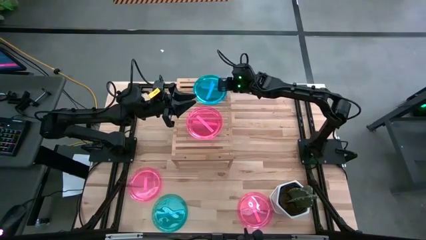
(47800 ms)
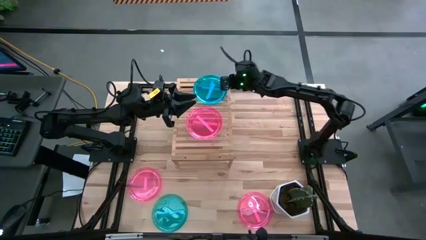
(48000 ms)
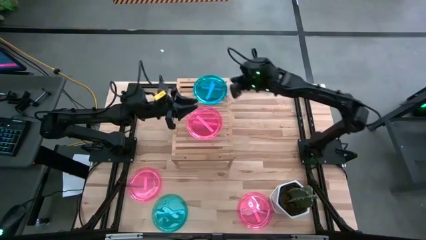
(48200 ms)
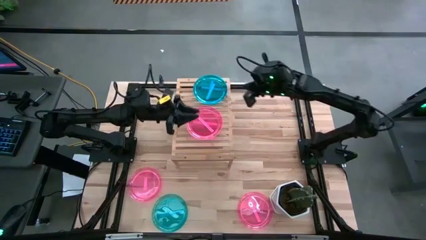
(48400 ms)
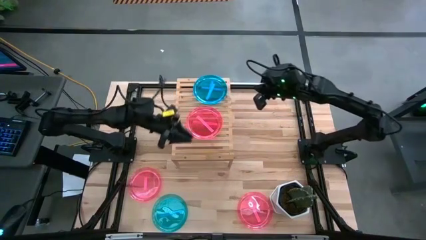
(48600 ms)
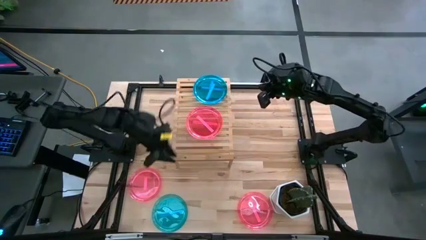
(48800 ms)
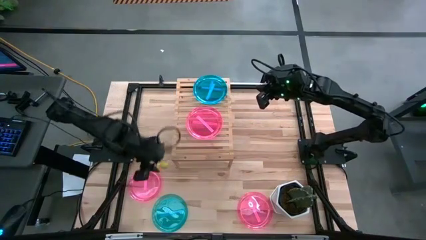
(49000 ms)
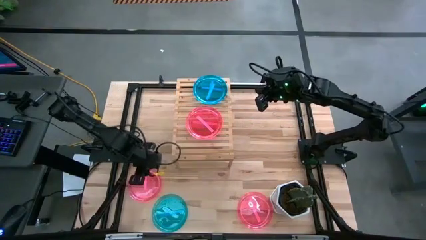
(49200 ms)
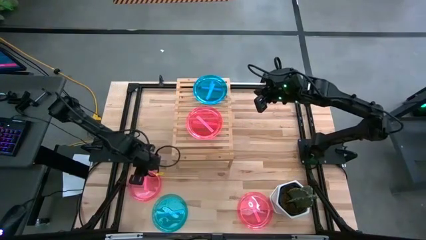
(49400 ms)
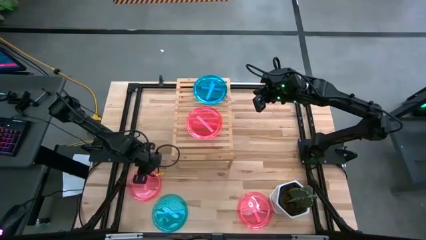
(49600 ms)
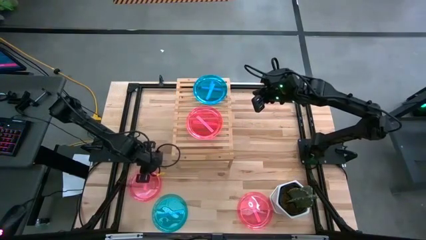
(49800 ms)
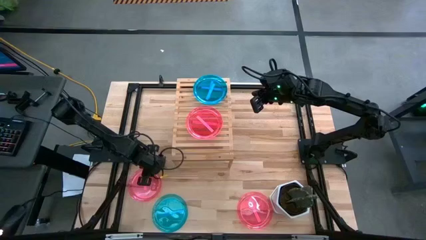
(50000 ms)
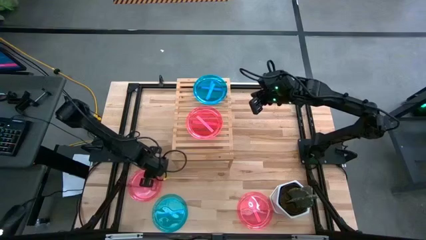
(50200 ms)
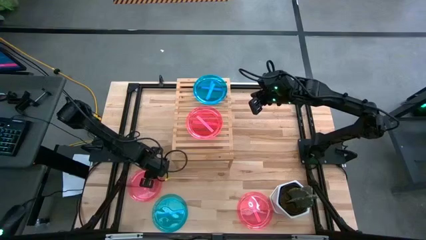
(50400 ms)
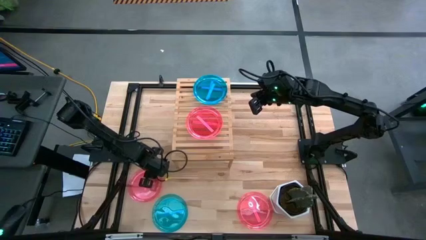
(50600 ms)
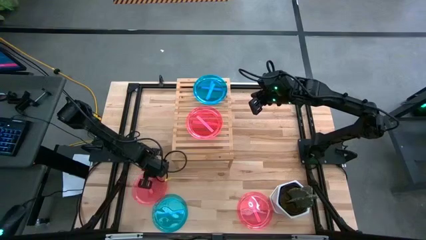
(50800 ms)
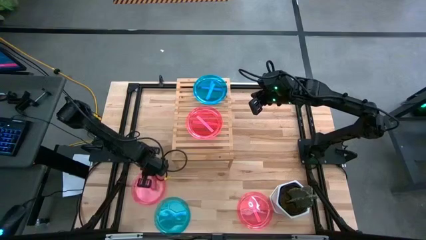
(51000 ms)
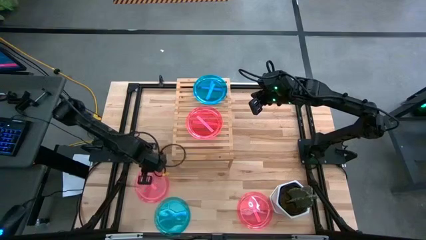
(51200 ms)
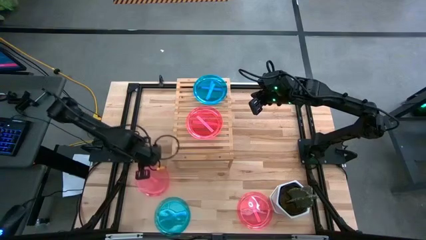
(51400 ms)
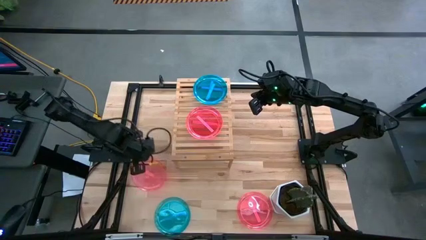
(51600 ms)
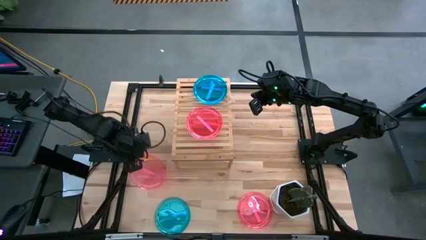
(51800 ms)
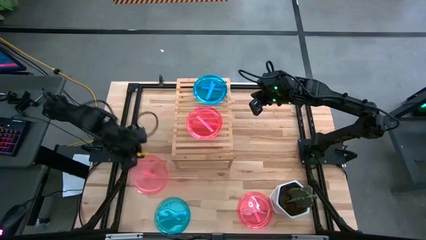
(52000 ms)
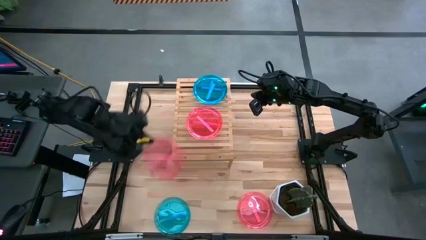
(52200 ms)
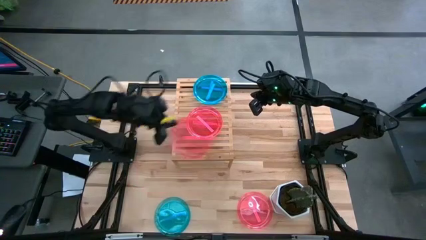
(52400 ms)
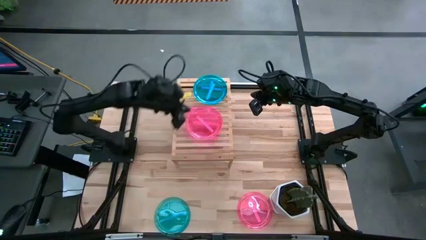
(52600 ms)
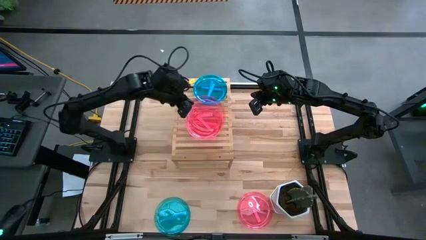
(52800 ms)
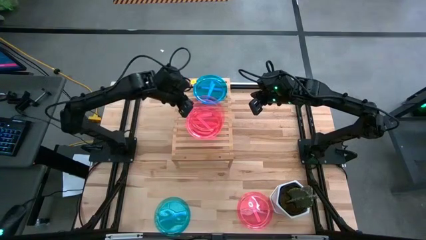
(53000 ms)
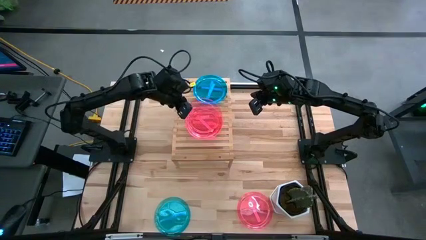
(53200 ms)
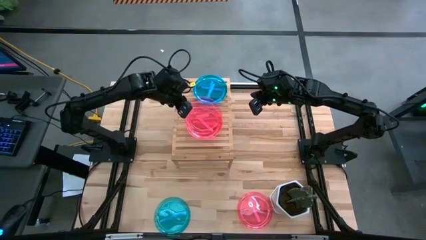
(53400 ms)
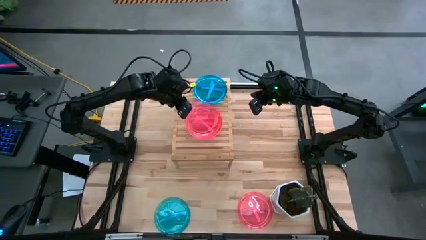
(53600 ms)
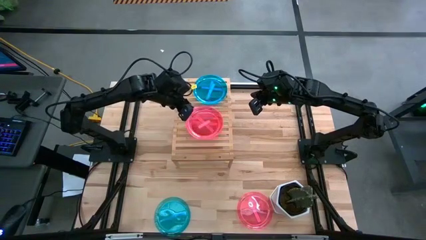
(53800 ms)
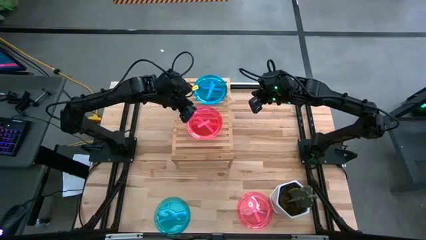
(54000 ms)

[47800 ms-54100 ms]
Task: Place and stack plates onto a shelf
Stack the pink plate on top of the pink plate on the shelf

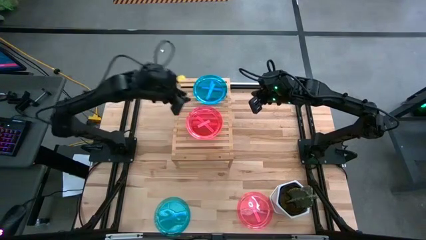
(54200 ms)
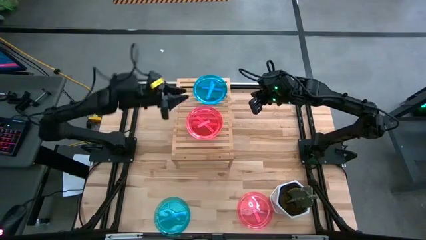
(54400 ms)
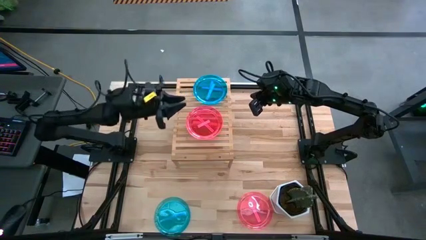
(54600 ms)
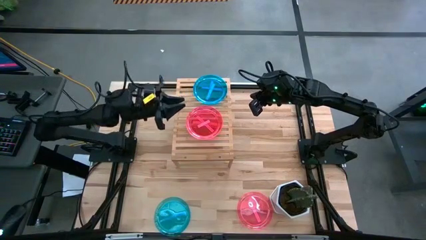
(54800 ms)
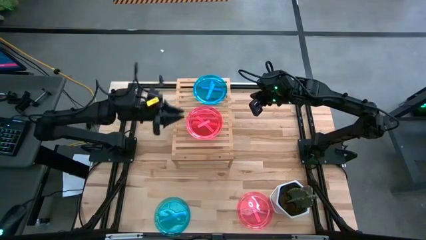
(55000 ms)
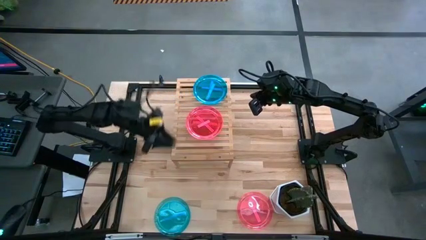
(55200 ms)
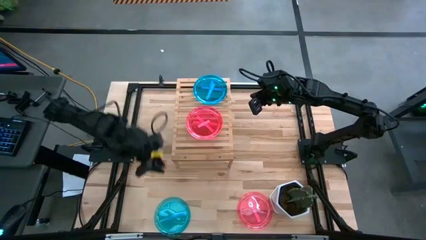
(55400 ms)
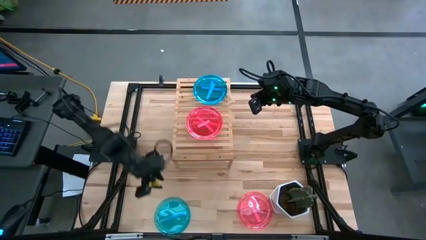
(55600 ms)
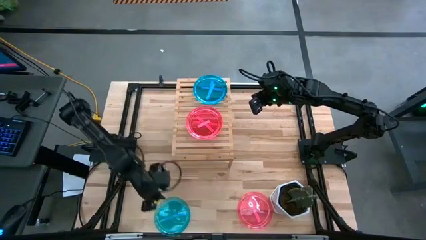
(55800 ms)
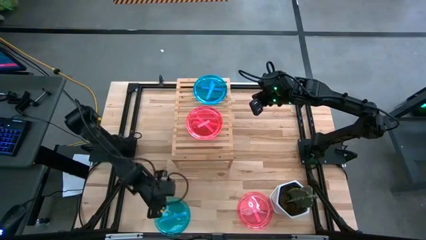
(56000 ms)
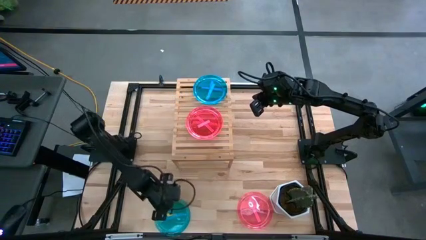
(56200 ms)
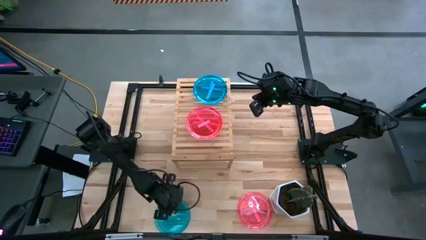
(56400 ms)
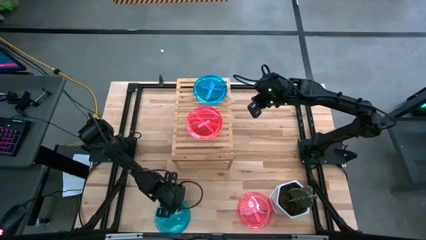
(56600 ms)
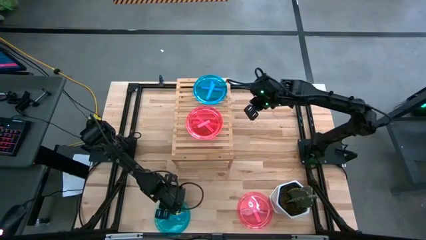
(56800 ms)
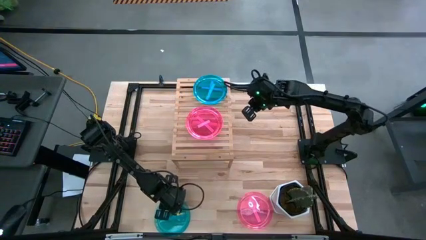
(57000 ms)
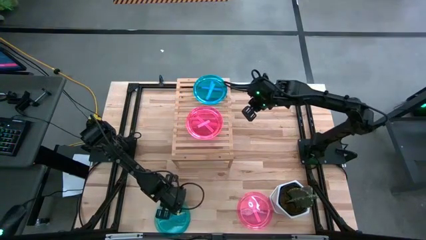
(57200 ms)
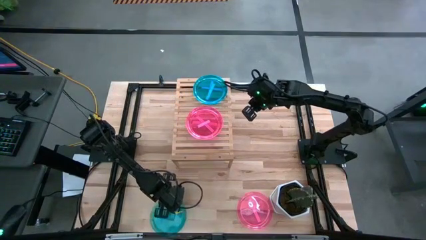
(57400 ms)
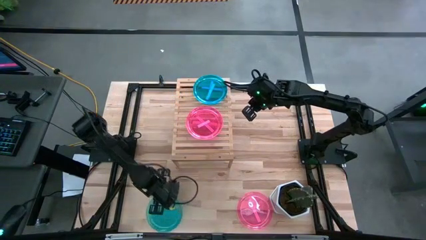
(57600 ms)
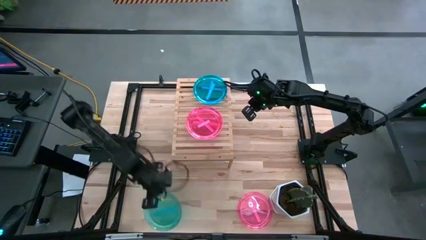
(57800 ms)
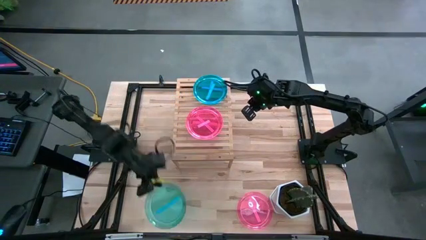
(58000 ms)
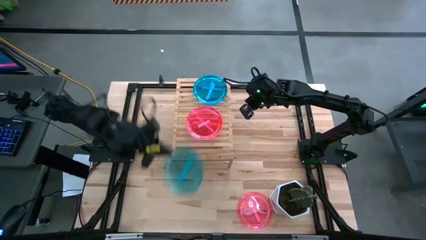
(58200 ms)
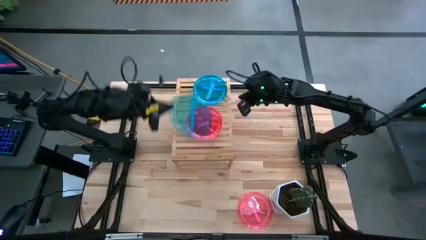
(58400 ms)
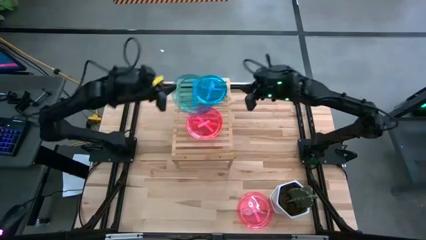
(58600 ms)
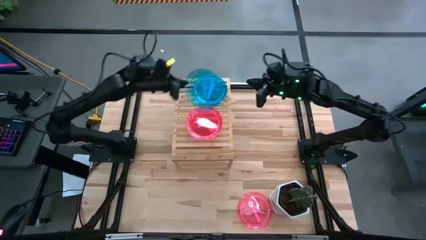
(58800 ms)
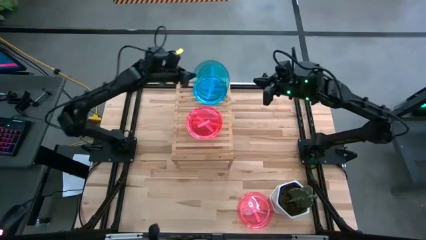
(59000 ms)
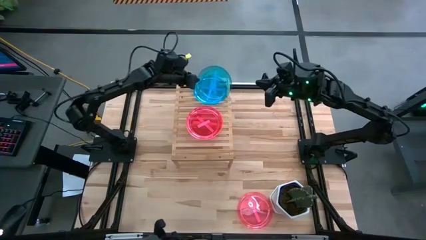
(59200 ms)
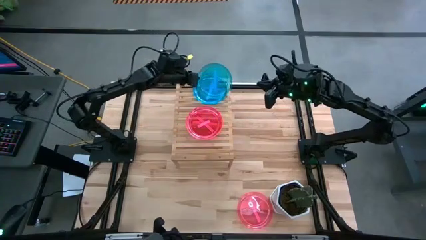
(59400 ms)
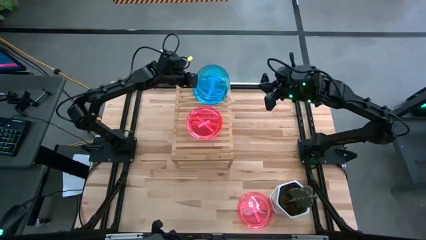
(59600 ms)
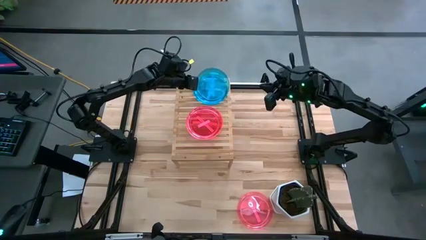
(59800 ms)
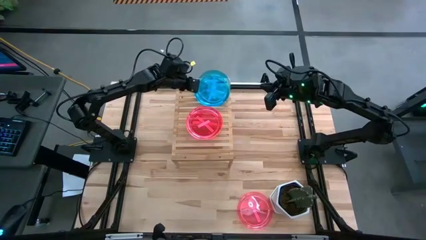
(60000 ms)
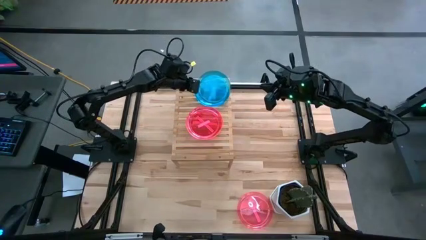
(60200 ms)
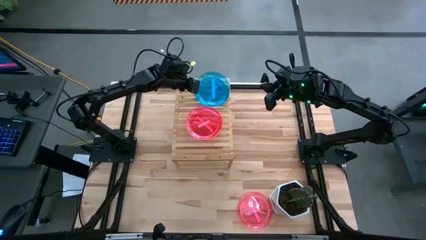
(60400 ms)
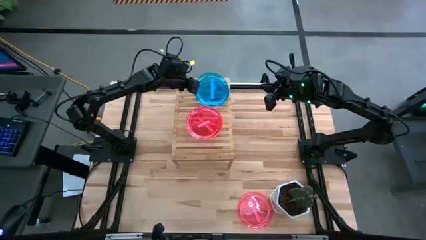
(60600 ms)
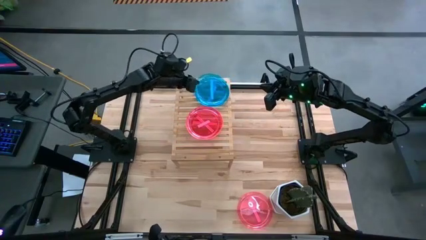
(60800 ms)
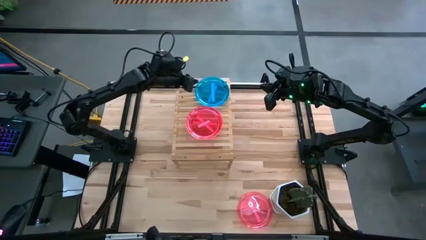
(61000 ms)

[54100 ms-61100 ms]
Stack the blue plate on top of the blue plate on the shelf

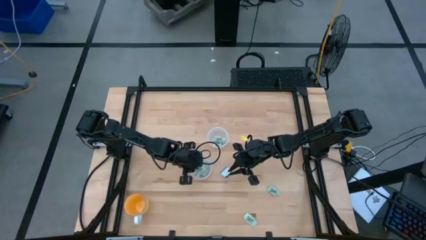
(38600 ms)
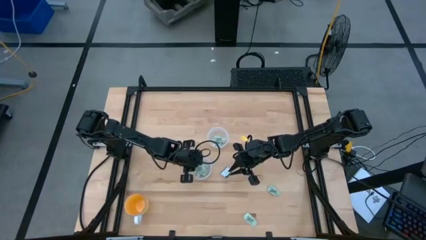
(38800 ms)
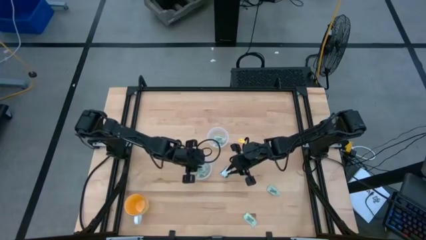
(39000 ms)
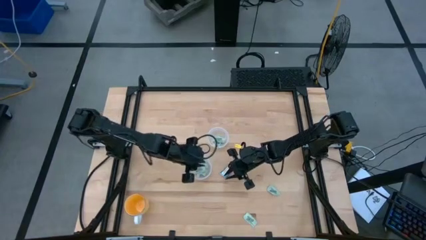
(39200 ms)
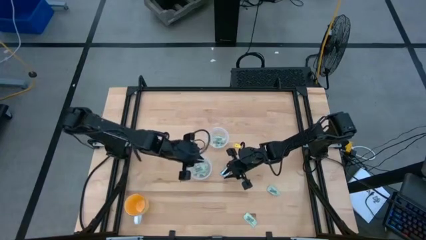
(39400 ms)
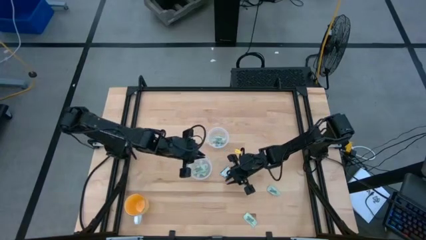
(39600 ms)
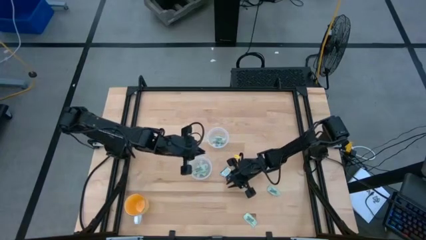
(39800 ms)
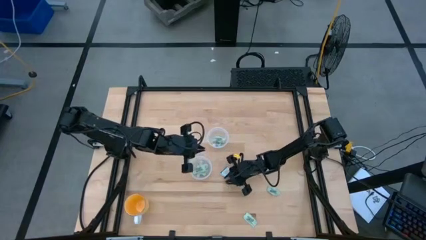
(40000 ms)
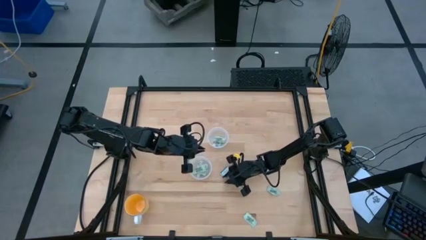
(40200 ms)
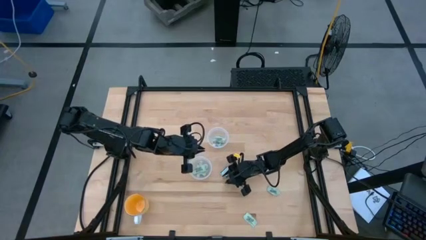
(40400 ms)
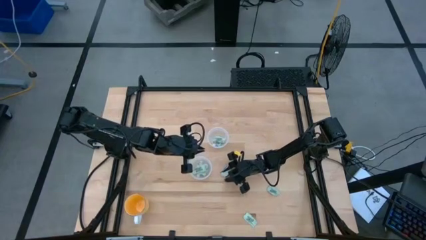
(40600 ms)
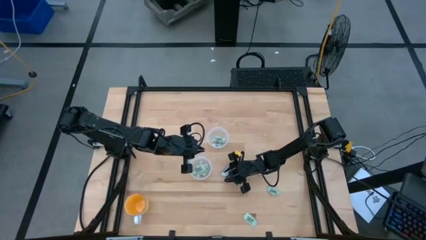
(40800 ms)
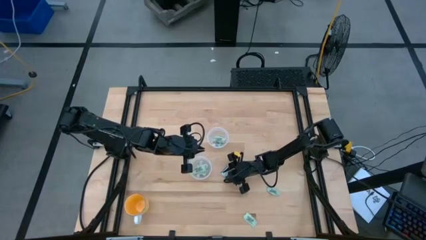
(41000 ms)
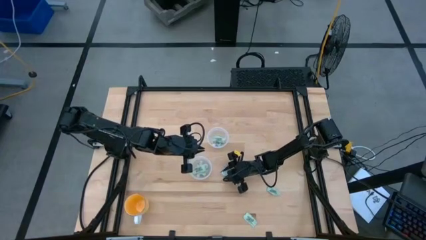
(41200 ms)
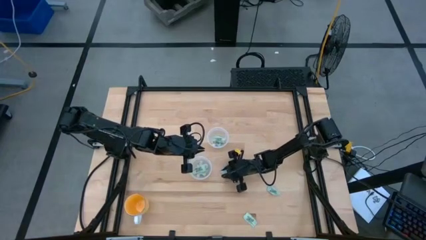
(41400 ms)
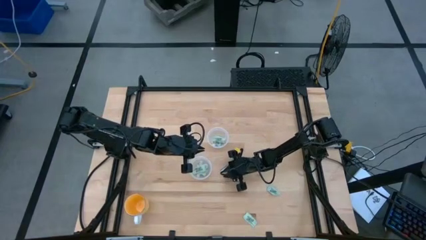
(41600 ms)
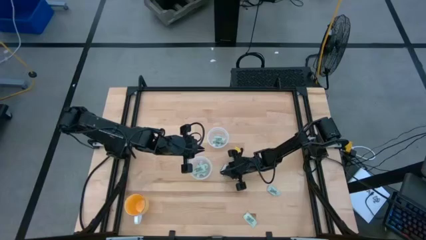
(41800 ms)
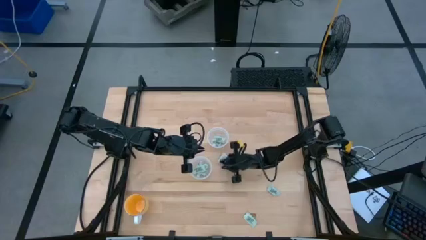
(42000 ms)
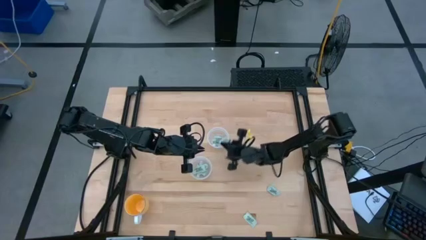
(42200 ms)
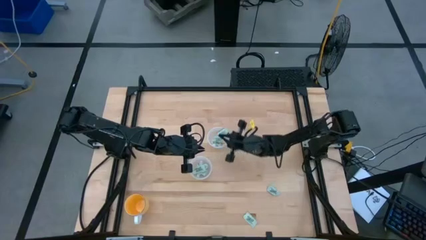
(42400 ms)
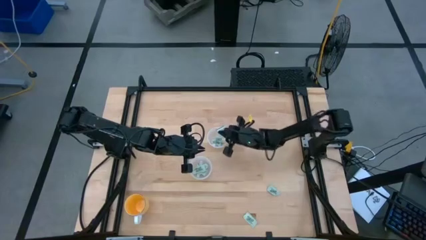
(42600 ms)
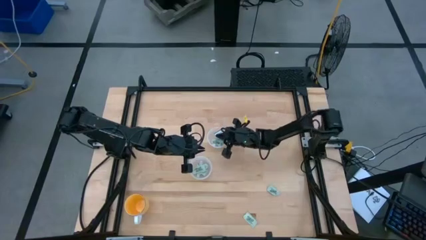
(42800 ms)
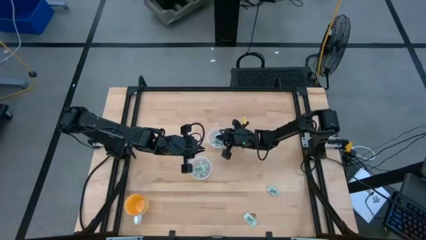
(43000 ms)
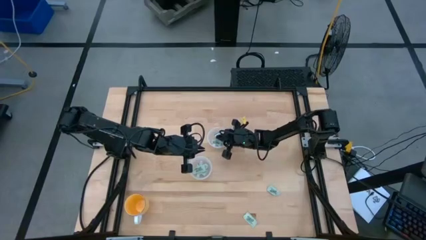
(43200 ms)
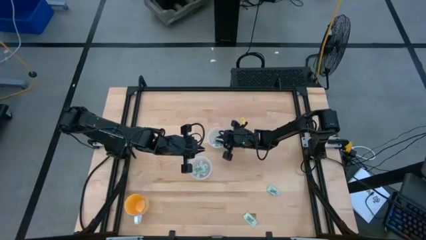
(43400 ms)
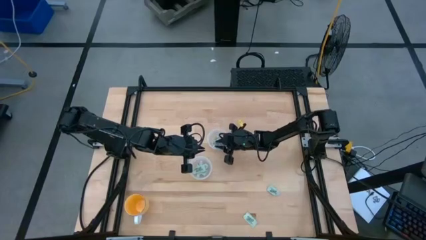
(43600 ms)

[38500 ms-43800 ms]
Task: Pick and place Stevia / Truvia into bins
Put the truvia packet into the top transparent container
